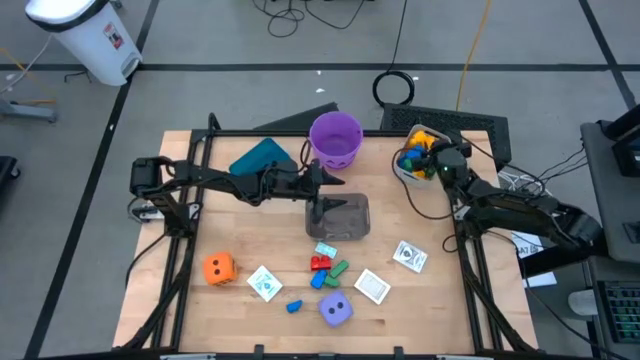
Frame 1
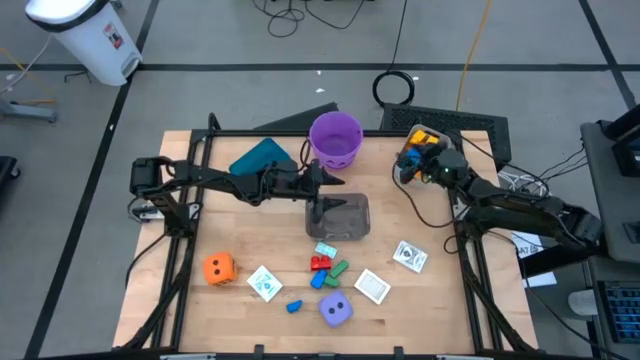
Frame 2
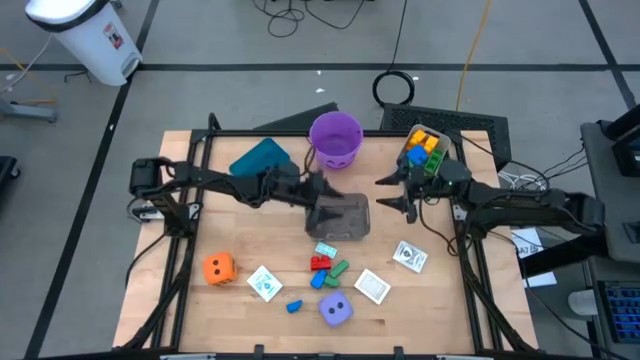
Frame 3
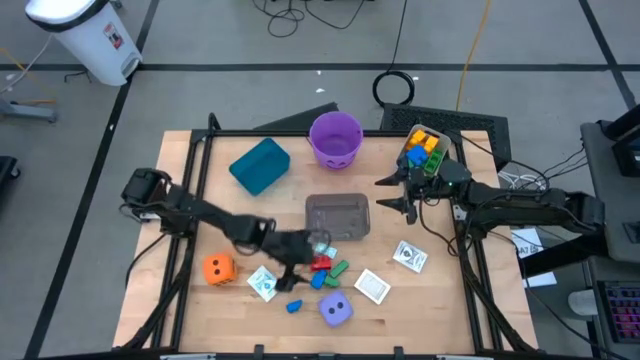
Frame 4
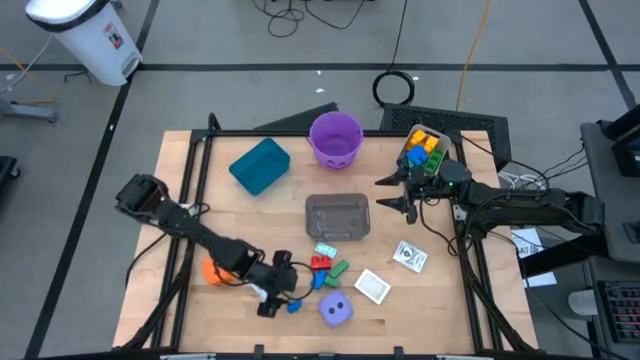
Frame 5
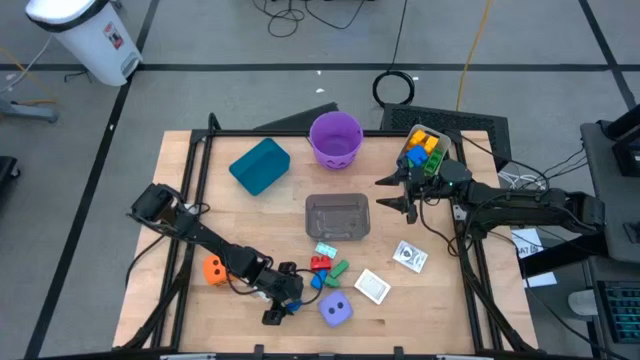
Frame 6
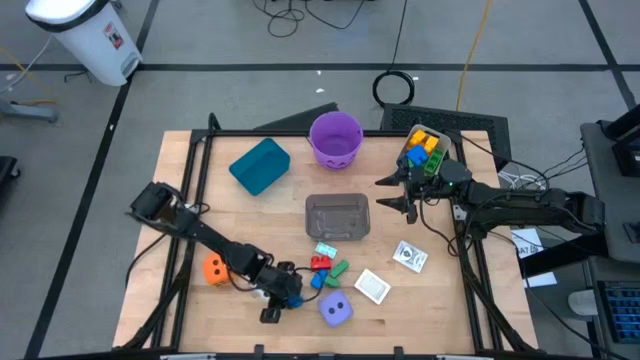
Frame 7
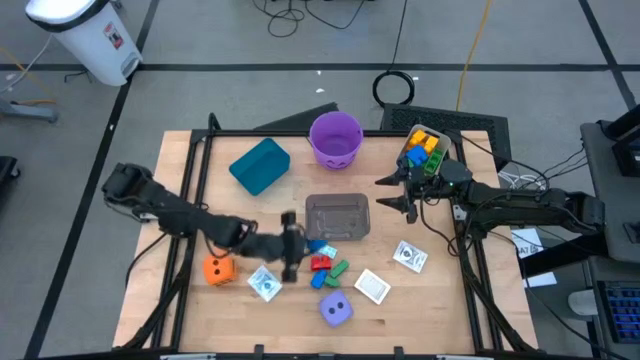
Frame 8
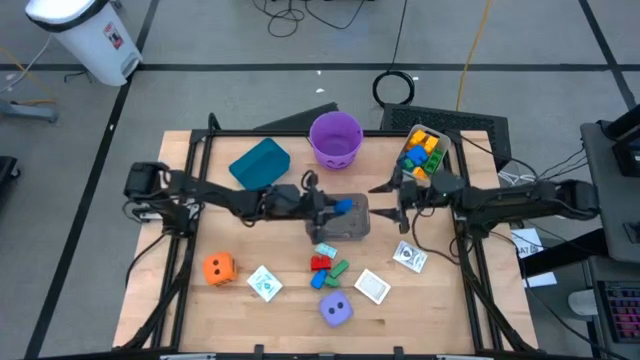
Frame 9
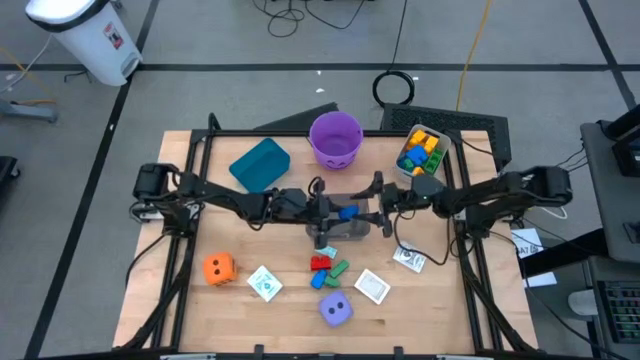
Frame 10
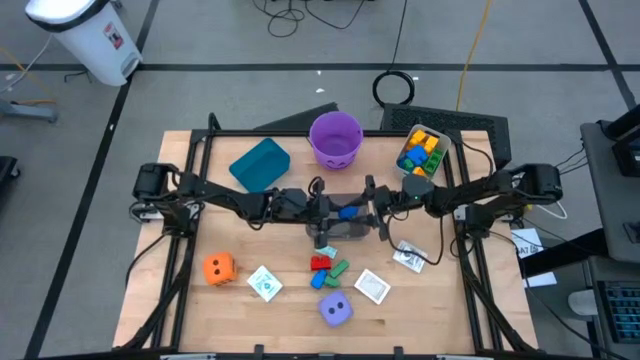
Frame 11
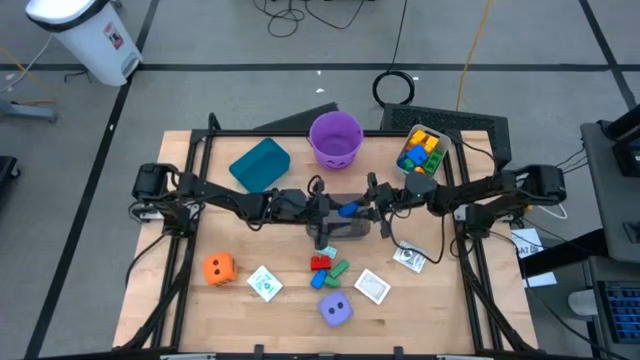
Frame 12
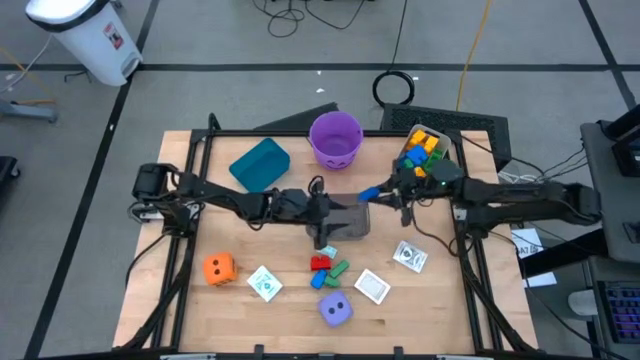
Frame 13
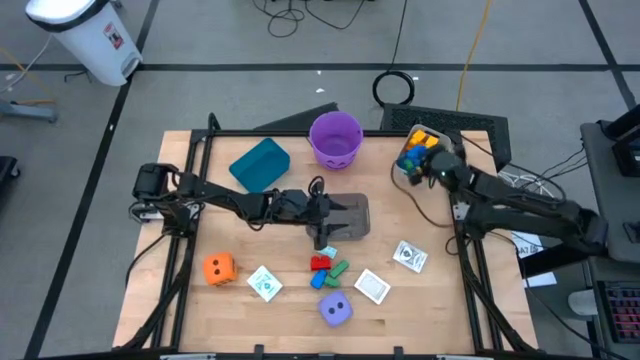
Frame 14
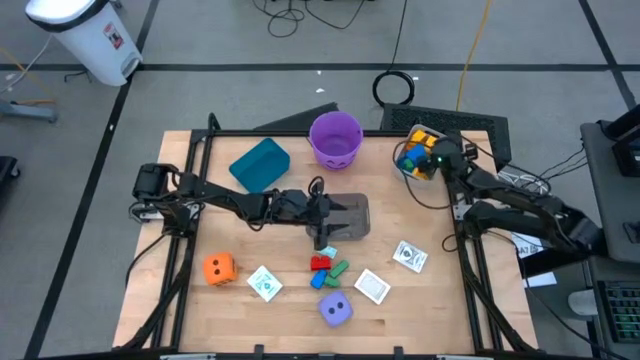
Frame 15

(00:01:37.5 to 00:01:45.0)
Task: Pick & Place Toys
Put the blue game piece into the white bin

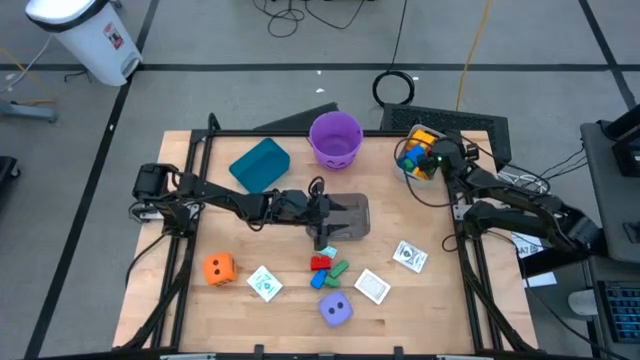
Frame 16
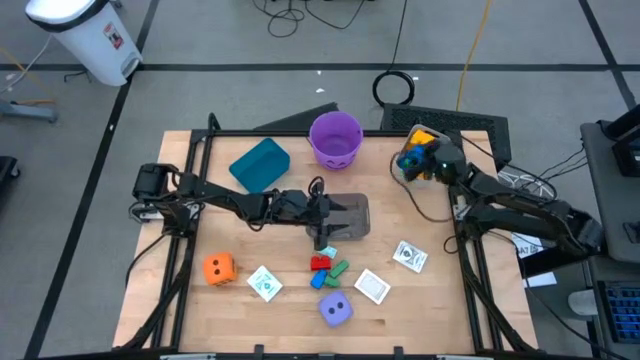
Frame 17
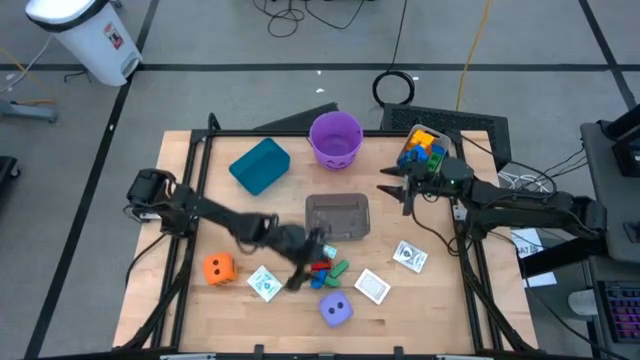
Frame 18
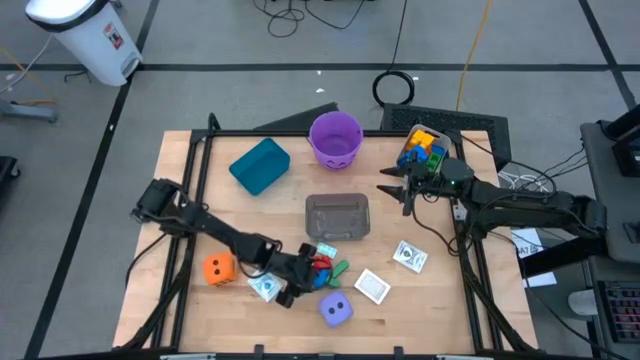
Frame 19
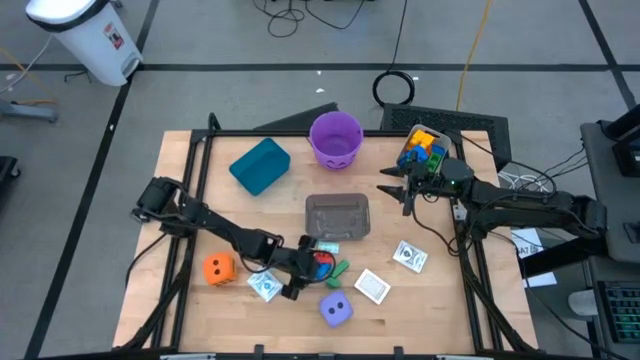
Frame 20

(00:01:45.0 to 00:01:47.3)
Put the blue game piece into the white bin

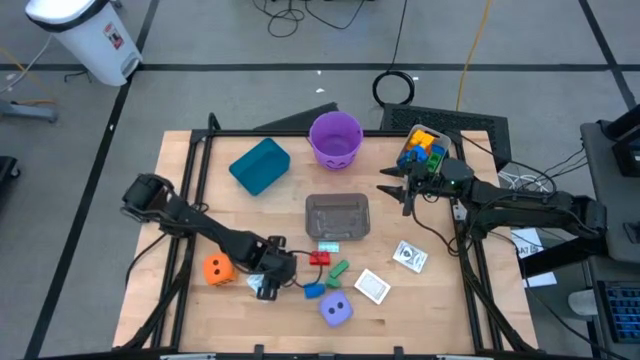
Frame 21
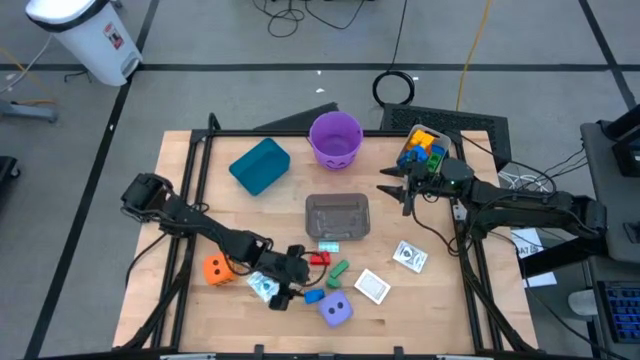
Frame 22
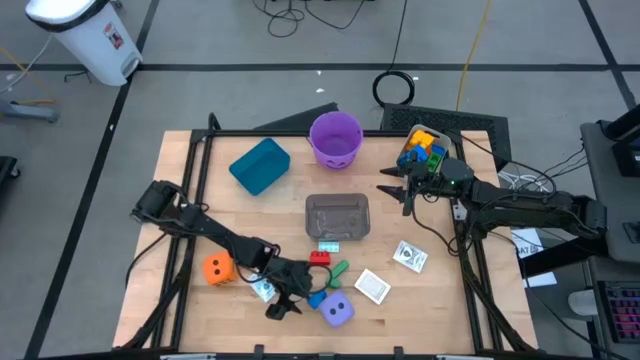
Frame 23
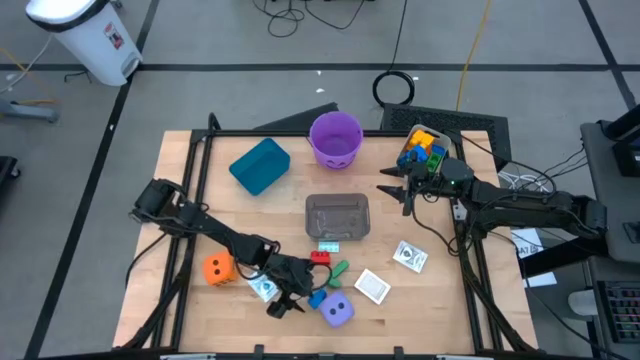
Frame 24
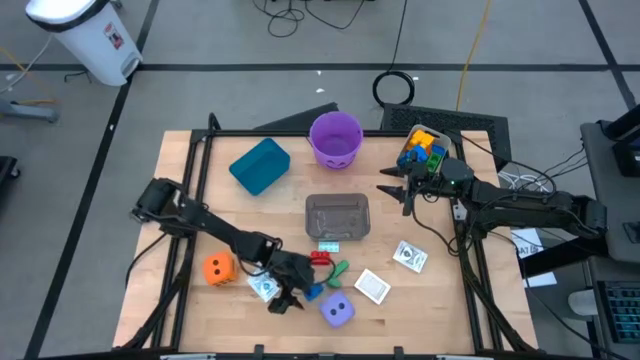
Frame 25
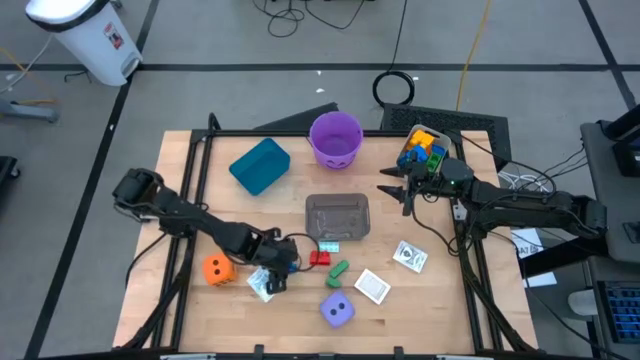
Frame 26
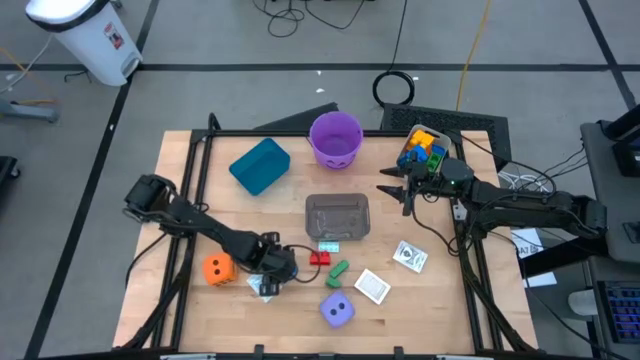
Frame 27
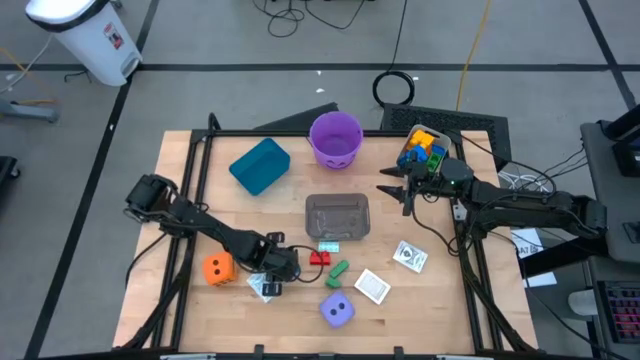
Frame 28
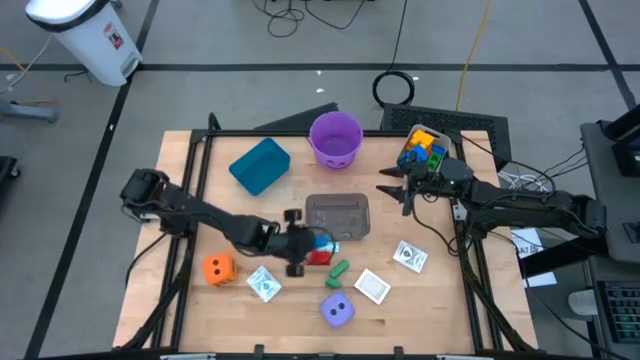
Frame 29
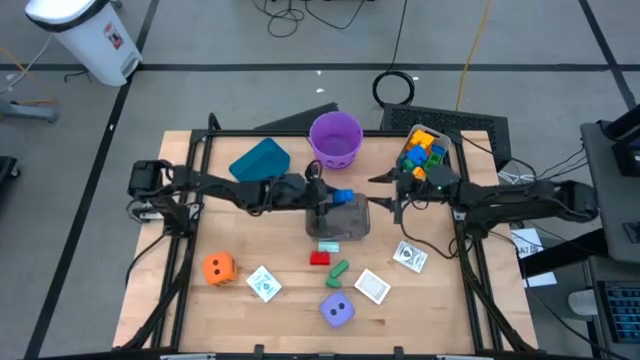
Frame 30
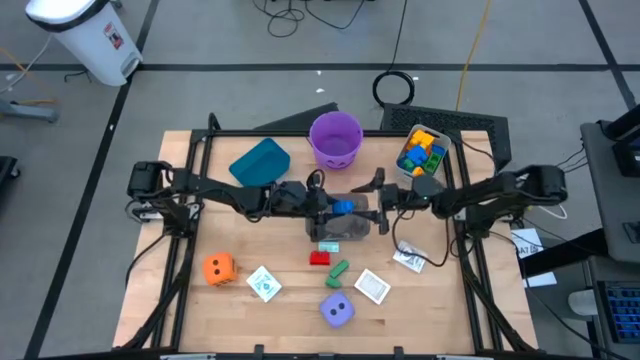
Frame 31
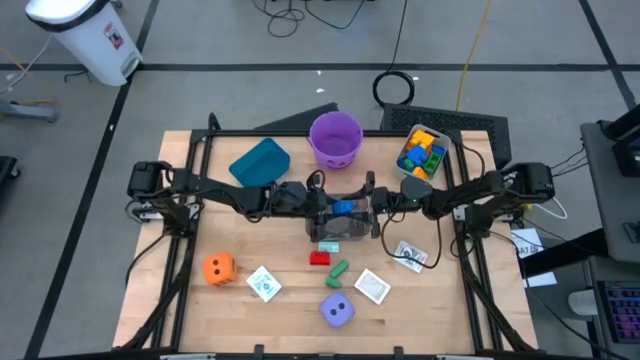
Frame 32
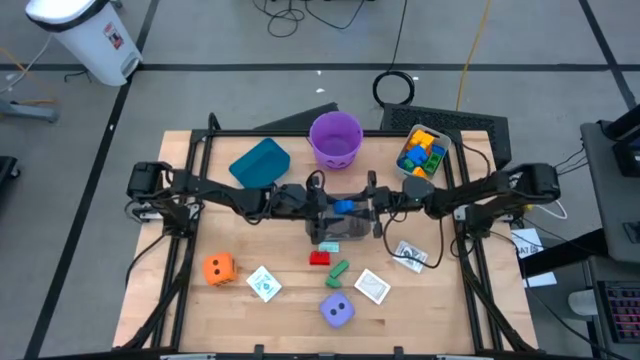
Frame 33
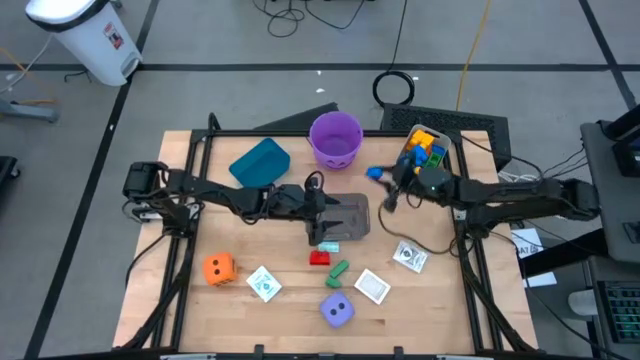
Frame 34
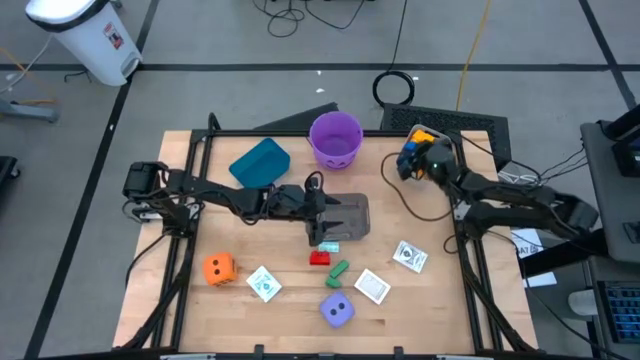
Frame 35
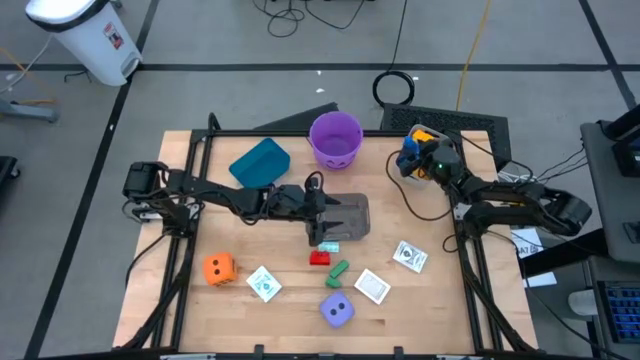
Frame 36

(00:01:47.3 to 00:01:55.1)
Put the blue game piece into the white bin

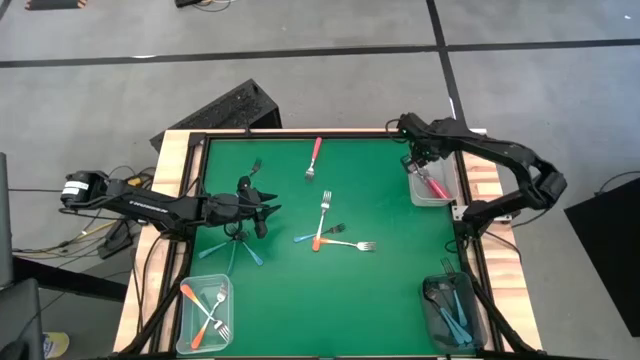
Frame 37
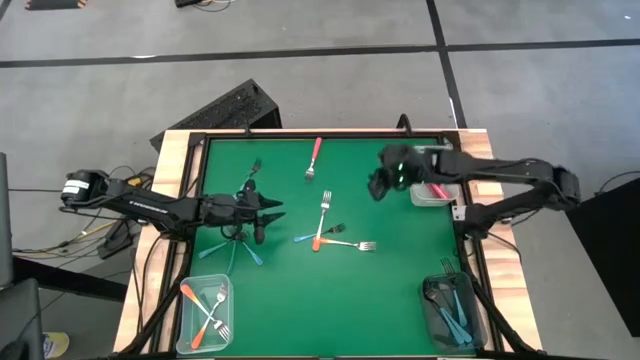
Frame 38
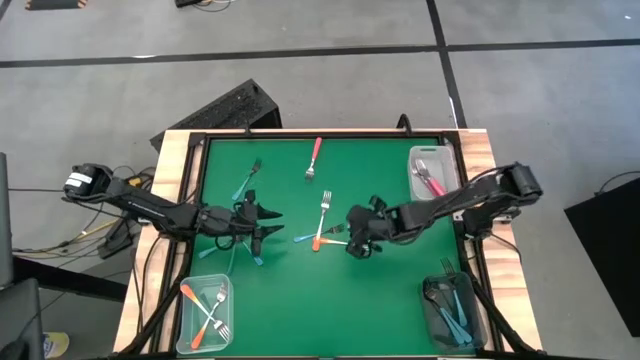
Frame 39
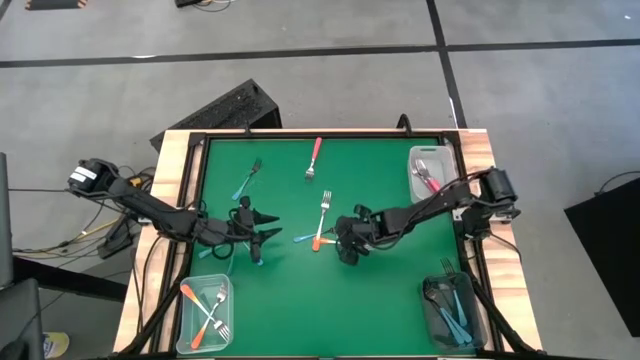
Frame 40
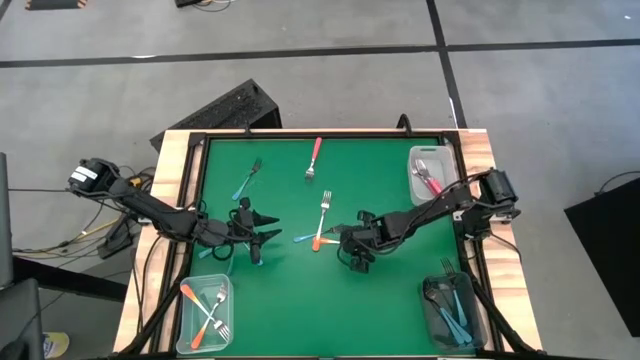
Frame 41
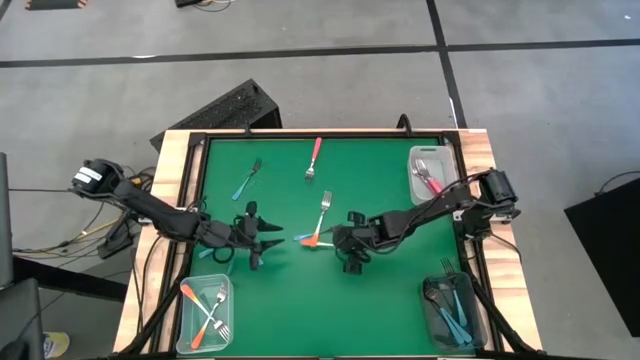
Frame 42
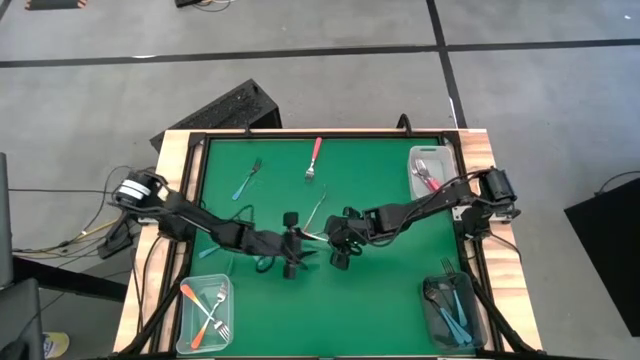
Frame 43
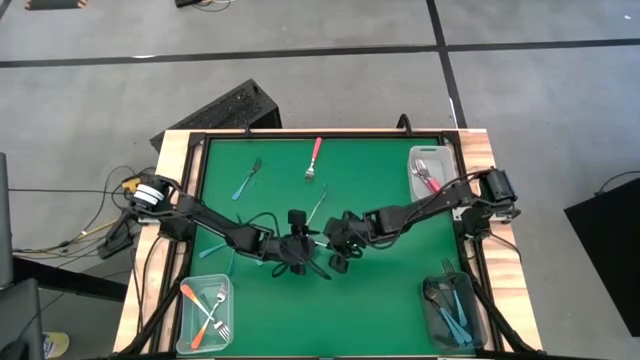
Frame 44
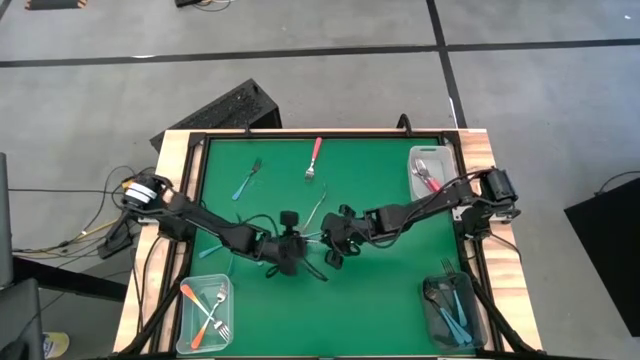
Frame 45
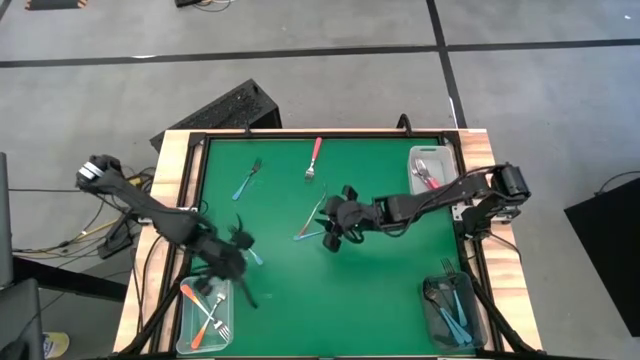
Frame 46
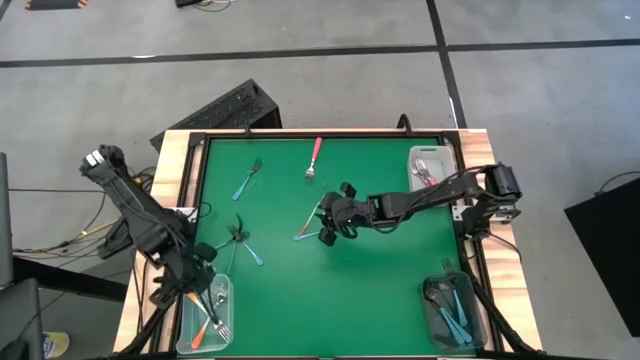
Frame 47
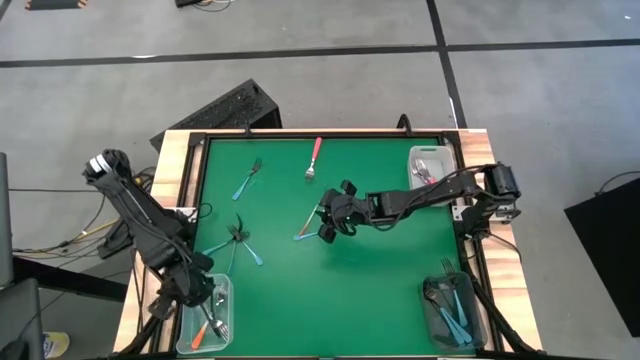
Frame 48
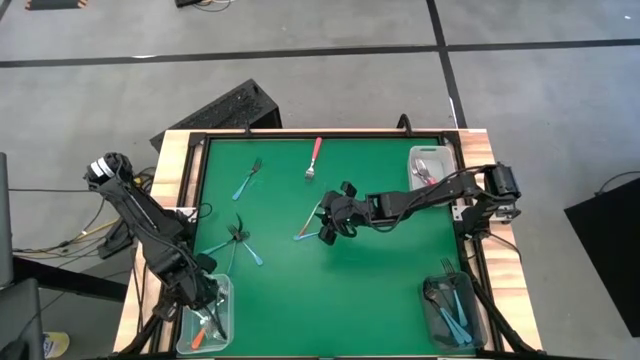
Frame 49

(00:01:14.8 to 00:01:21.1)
Task: Sort silverware by color (type)
Put the orange fork into the transparent bin
